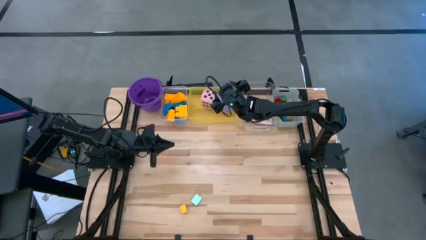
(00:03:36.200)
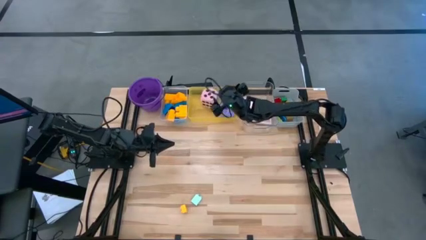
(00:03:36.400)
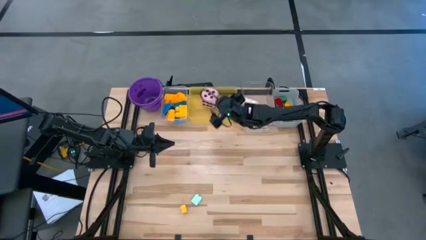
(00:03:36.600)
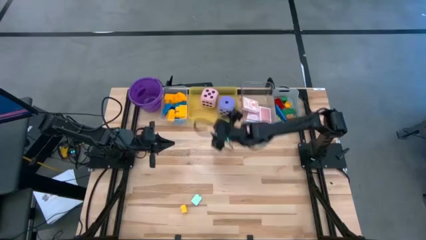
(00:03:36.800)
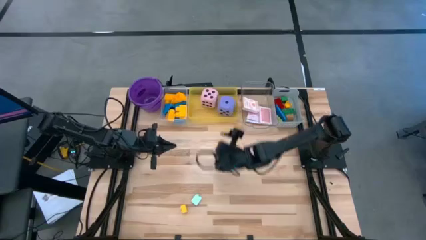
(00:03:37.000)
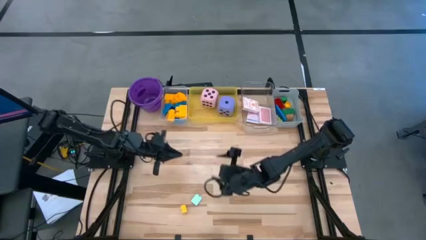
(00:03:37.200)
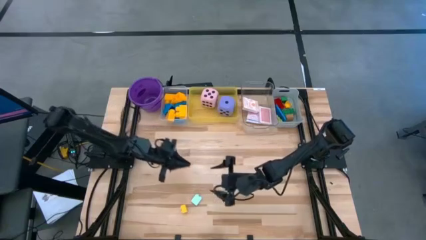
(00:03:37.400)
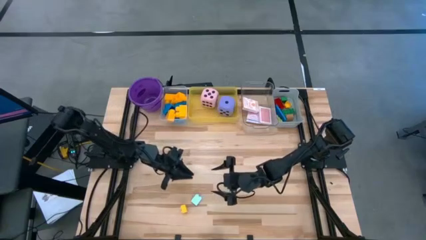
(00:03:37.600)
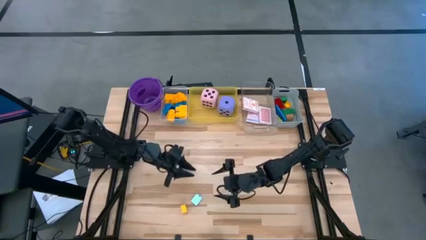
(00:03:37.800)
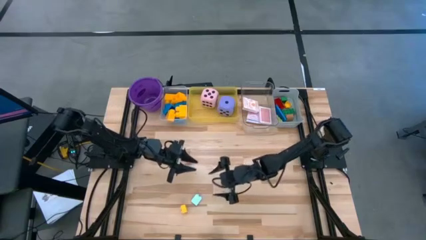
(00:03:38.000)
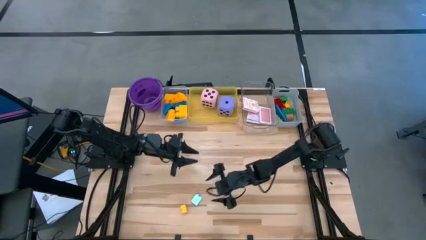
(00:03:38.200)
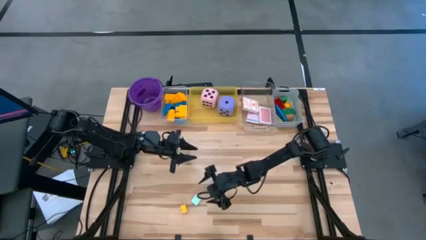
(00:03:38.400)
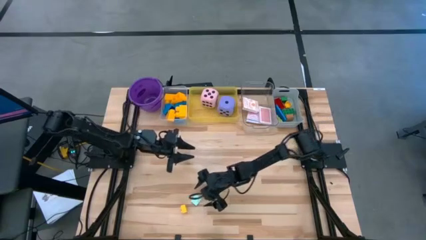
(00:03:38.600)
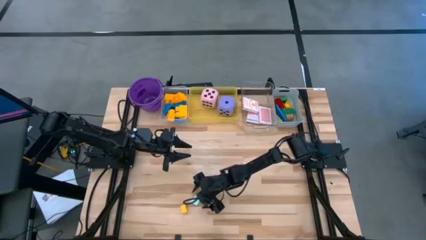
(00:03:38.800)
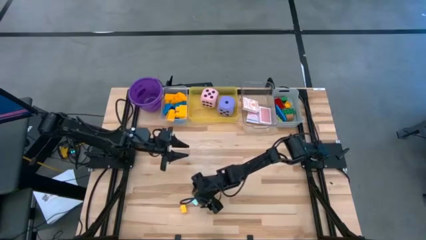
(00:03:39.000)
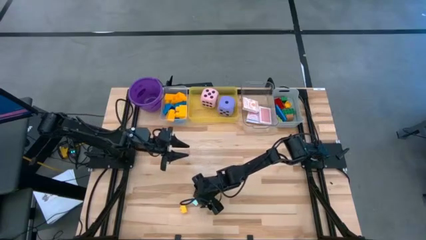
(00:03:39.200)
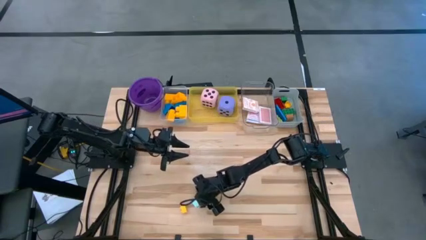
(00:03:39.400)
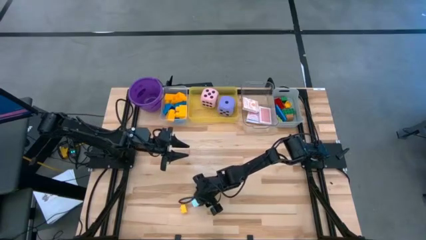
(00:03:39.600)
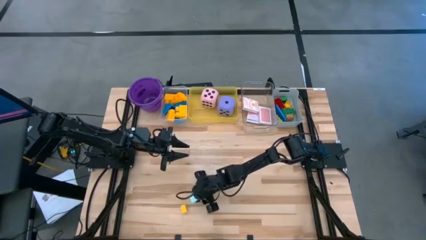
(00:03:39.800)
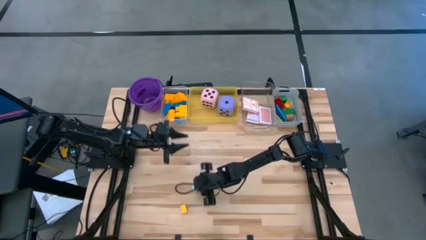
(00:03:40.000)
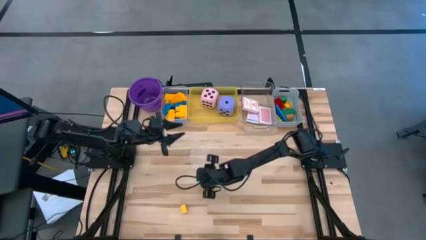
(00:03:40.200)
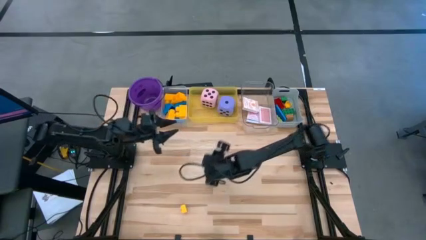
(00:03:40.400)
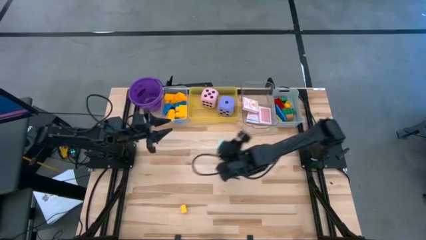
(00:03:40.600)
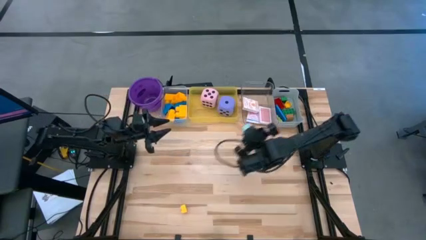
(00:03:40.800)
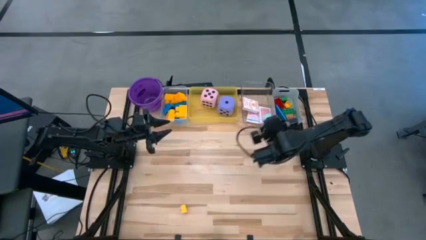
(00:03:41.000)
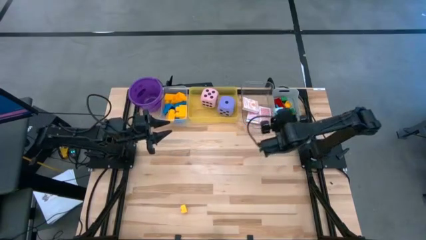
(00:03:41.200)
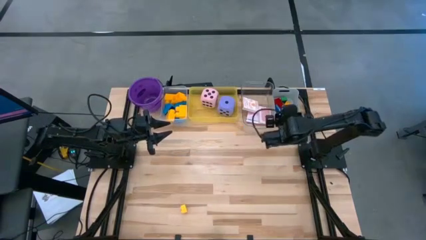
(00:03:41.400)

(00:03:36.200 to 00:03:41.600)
Task: Pick & Place Toys
Put the small light blue game piece into the gray bin

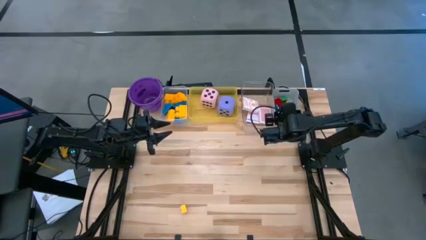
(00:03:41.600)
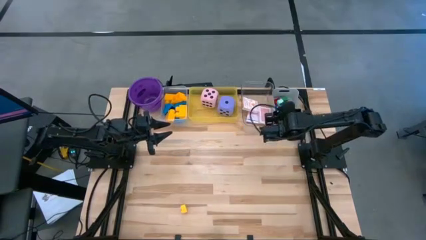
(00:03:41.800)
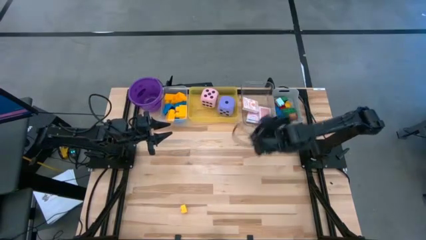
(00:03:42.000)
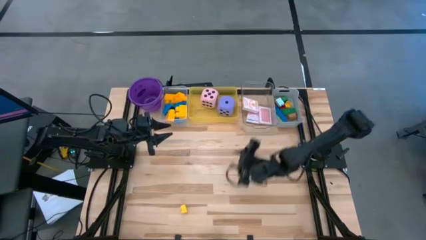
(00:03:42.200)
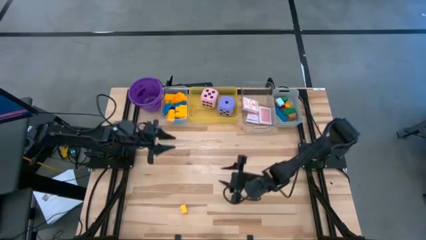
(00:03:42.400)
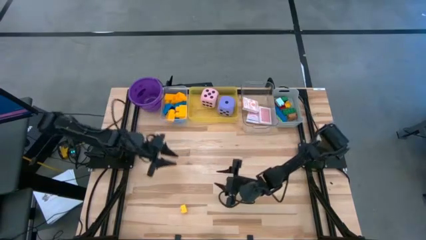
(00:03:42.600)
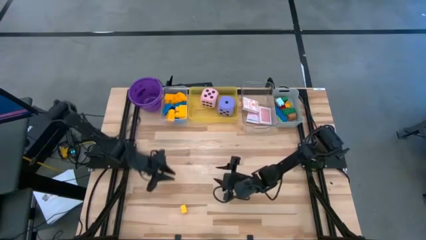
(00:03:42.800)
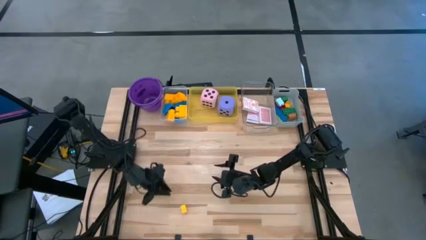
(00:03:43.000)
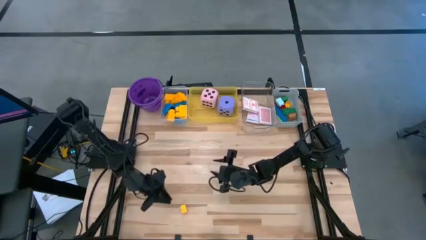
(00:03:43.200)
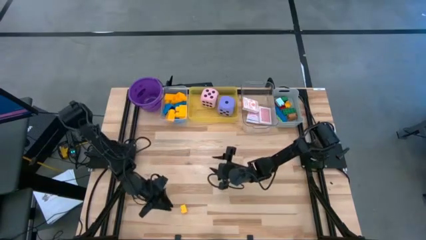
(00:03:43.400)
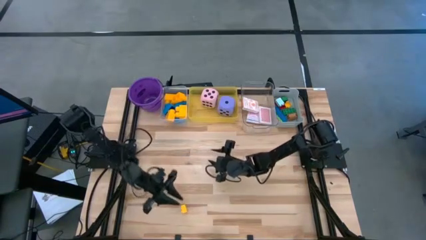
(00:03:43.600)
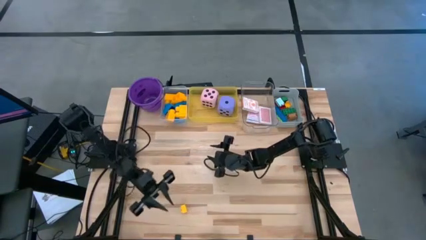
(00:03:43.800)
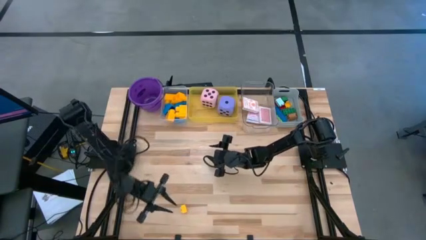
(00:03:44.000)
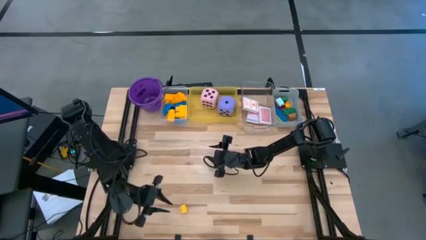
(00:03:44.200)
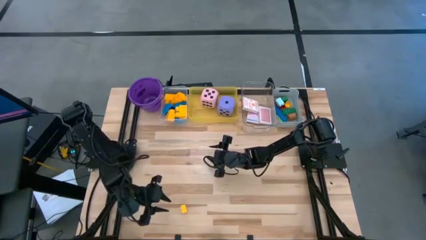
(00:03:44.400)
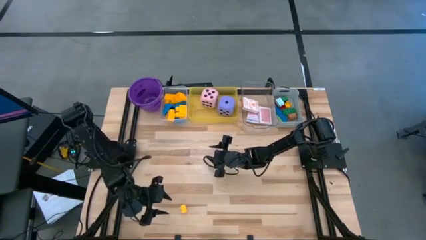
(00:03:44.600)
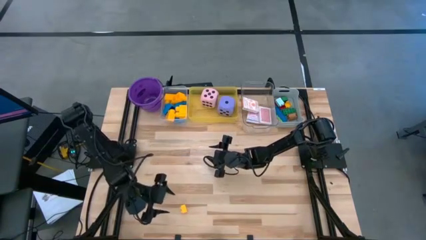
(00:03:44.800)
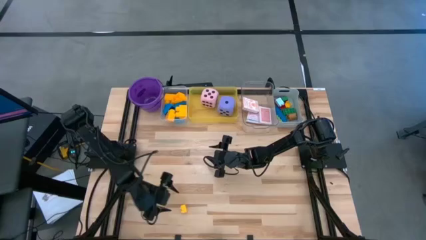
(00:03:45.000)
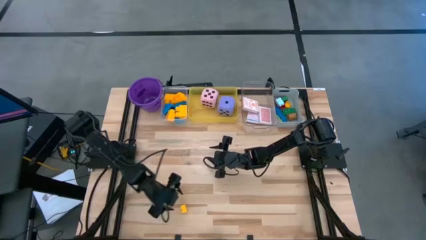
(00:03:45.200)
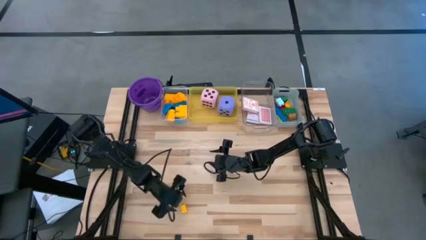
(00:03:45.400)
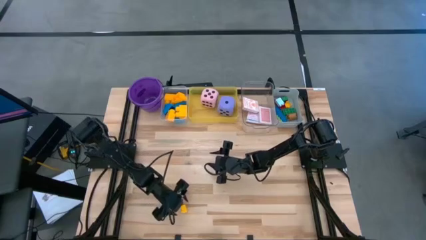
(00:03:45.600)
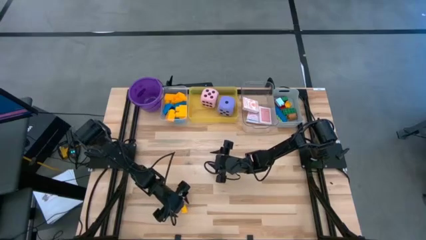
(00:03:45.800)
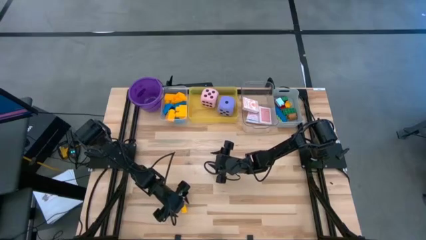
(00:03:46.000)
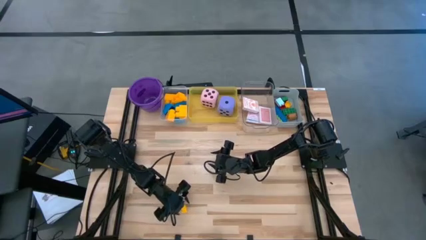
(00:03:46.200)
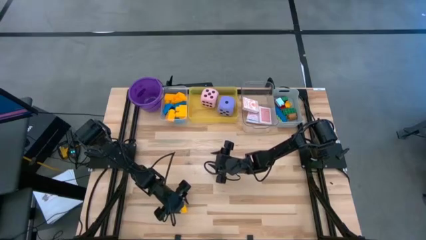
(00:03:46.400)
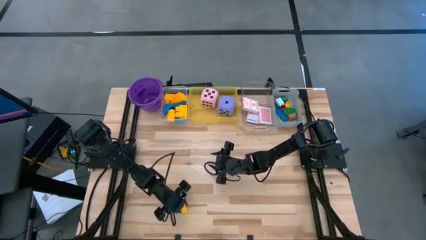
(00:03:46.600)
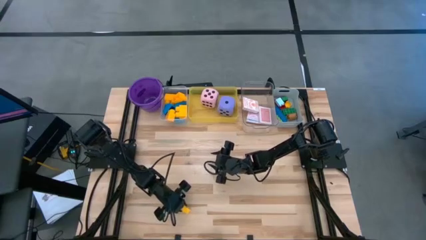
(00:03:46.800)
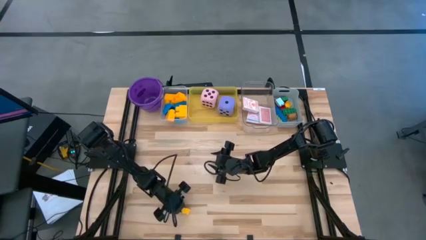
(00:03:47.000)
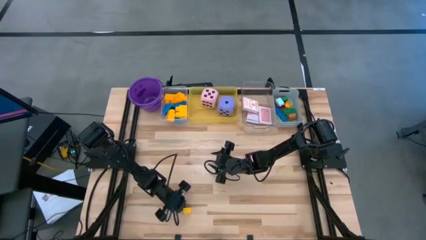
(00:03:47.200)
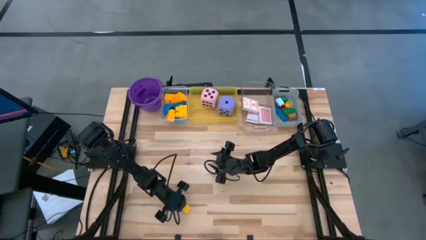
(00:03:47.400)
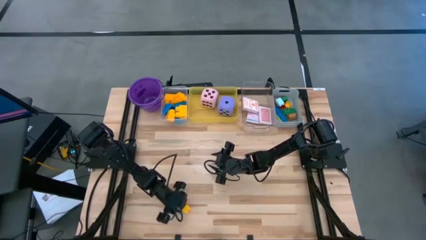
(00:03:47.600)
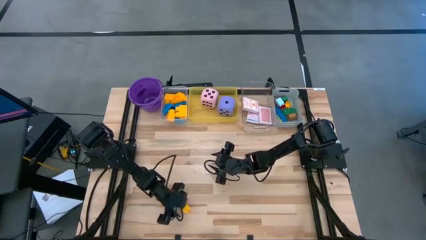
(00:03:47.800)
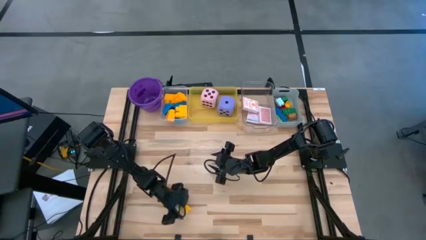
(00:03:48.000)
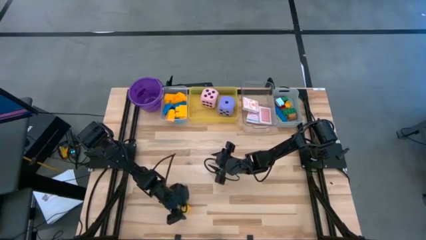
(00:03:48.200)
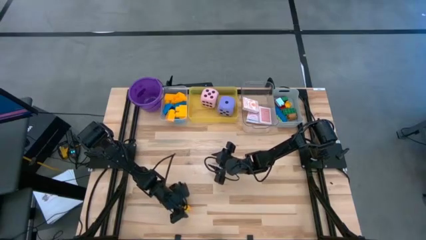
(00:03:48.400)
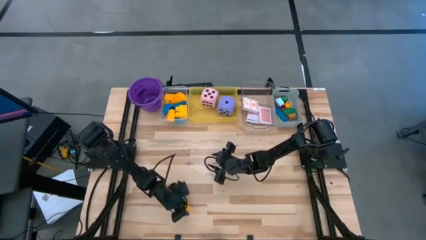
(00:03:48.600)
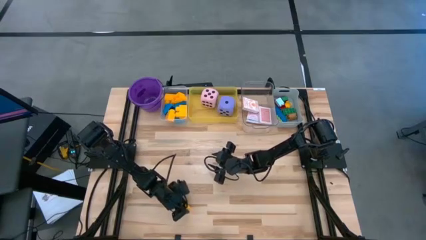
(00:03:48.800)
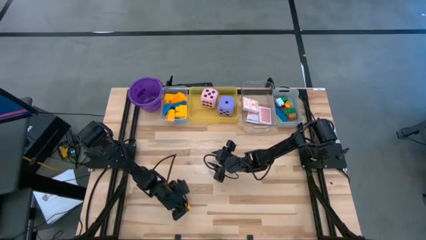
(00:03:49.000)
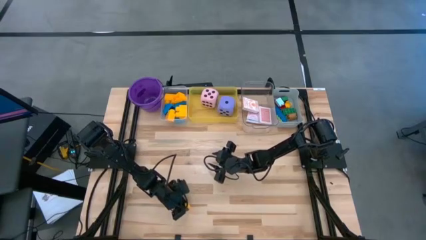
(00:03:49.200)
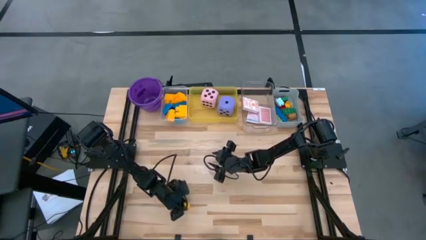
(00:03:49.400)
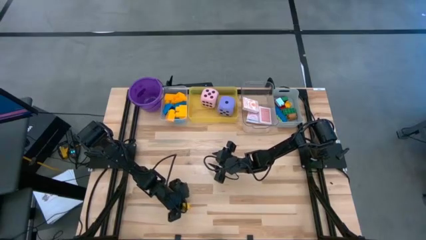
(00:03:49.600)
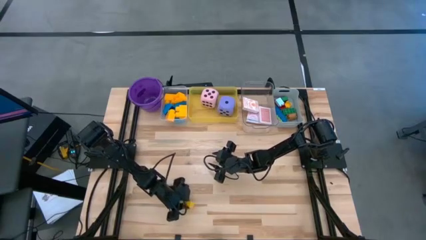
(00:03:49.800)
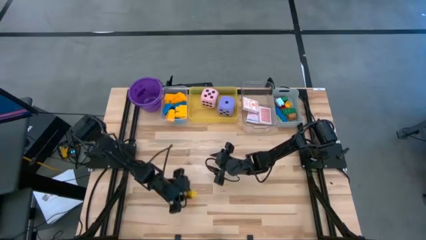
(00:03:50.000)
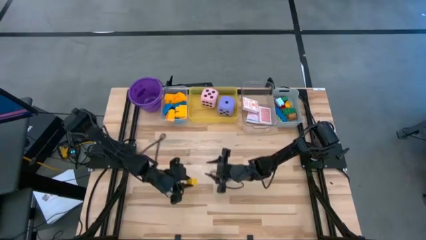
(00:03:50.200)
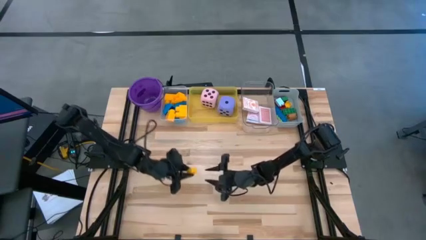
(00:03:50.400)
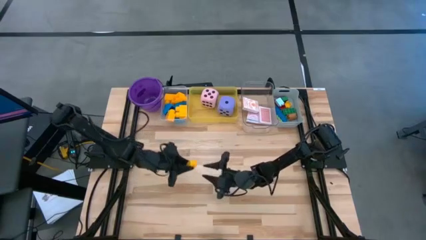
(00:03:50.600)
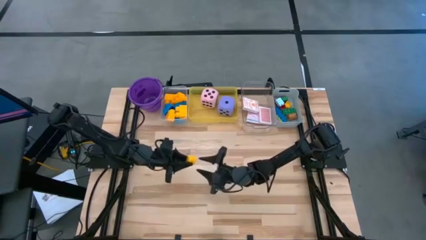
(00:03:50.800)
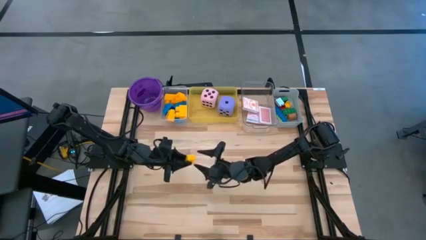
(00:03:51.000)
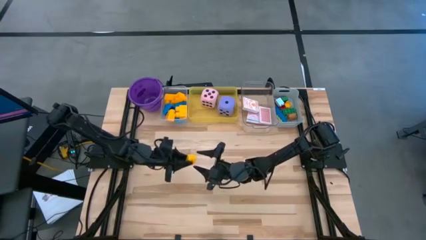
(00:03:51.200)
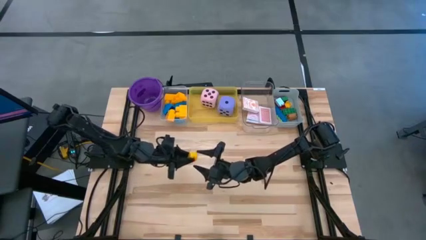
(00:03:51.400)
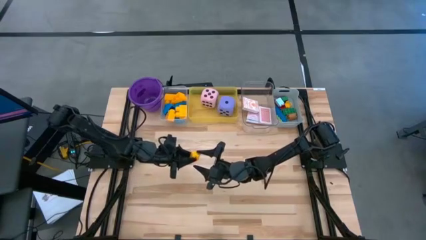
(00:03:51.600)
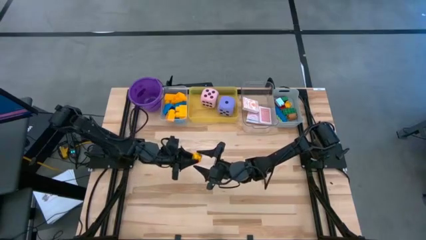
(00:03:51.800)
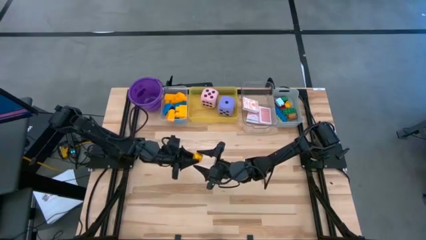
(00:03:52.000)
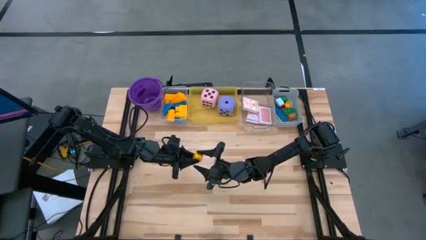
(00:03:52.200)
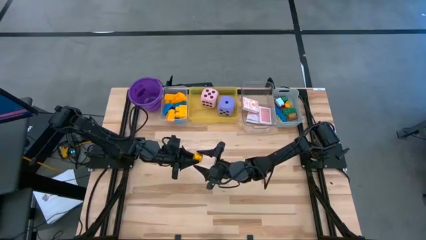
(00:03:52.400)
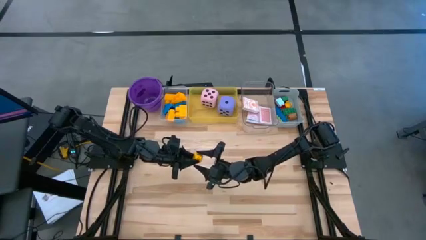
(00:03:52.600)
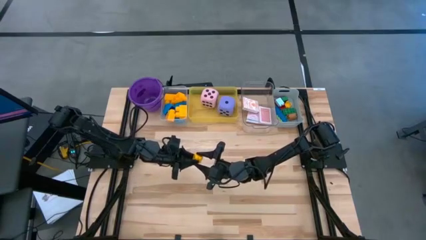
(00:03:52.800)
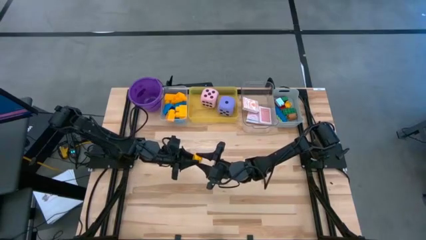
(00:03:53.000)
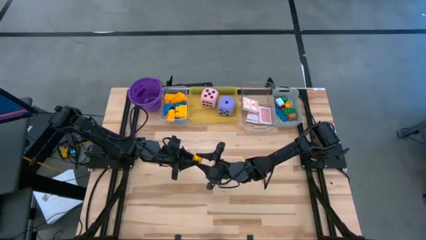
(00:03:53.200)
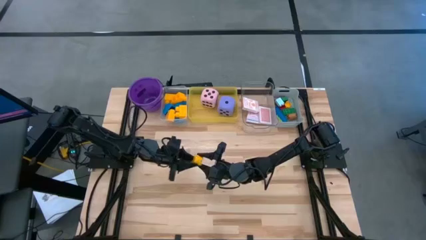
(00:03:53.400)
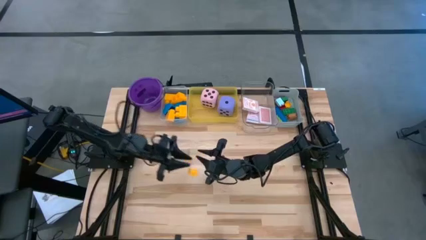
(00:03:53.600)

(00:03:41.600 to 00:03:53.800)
Put the small yellow game piece into the gray bin
